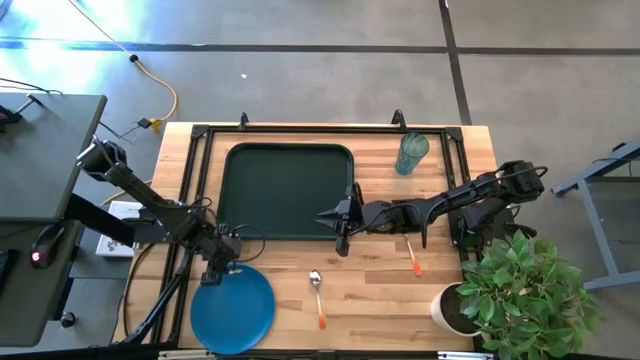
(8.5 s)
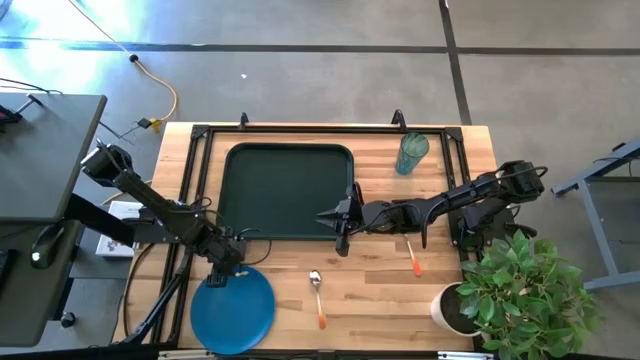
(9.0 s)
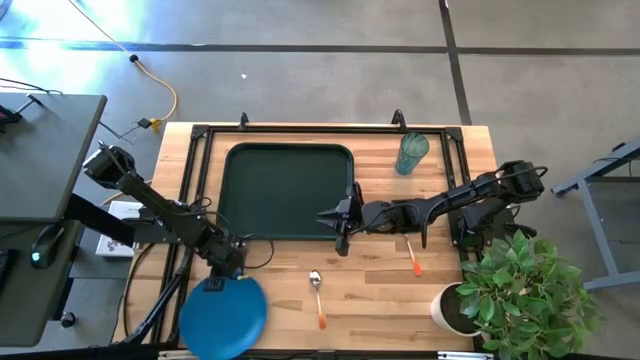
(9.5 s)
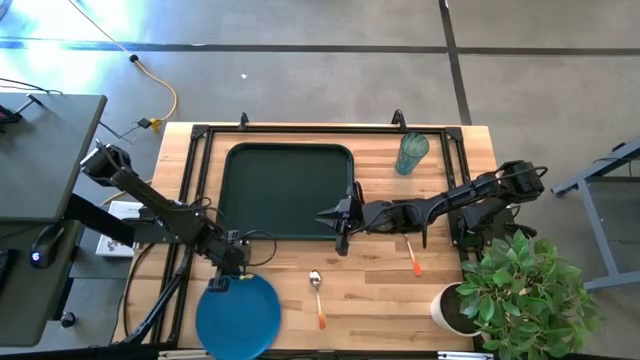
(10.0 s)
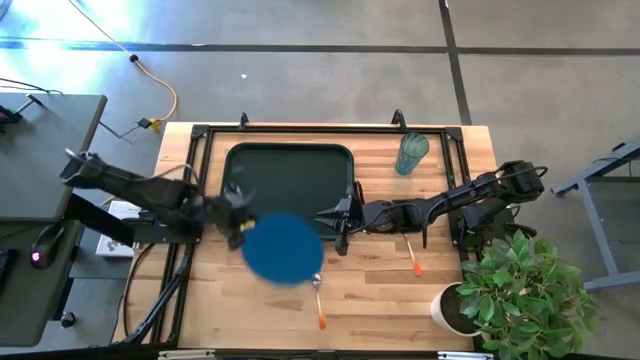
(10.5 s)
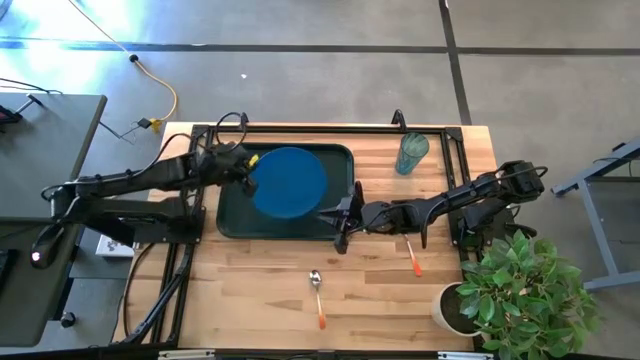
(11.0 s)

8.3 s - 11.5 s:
Task: Pick and place plate/cup/fork/spoon on tray
Put the blue plate on the black tray

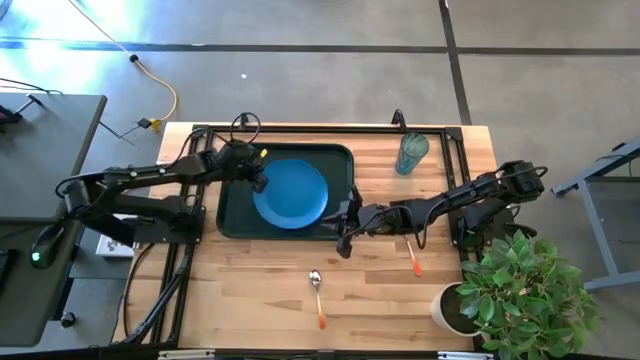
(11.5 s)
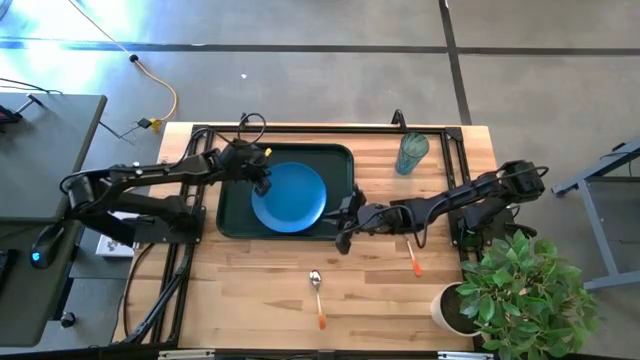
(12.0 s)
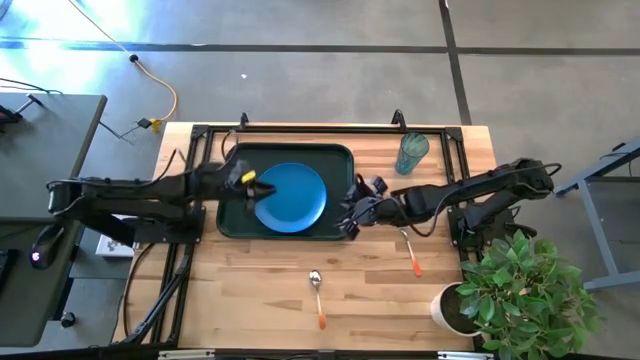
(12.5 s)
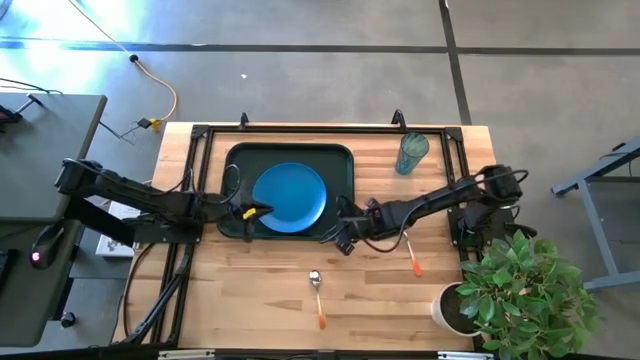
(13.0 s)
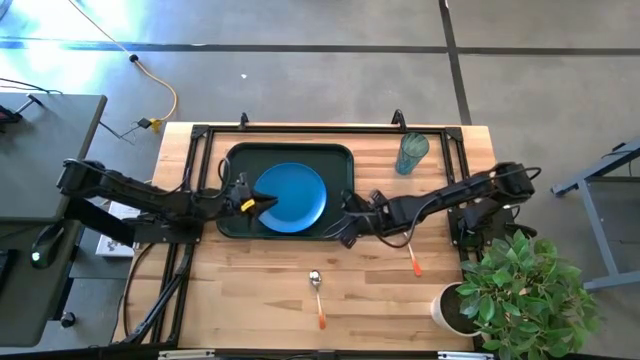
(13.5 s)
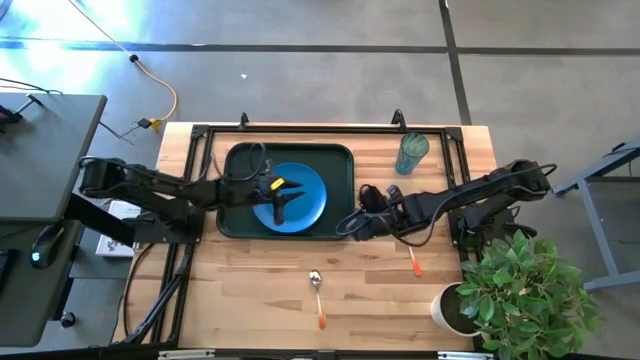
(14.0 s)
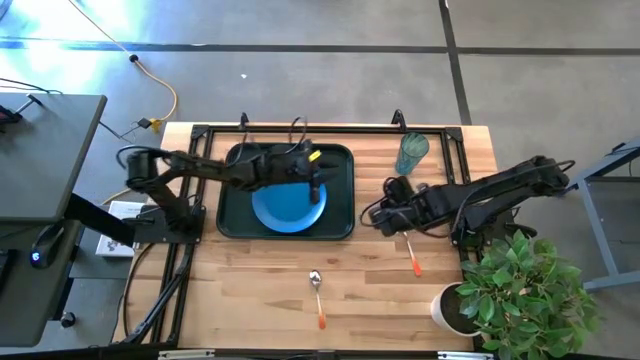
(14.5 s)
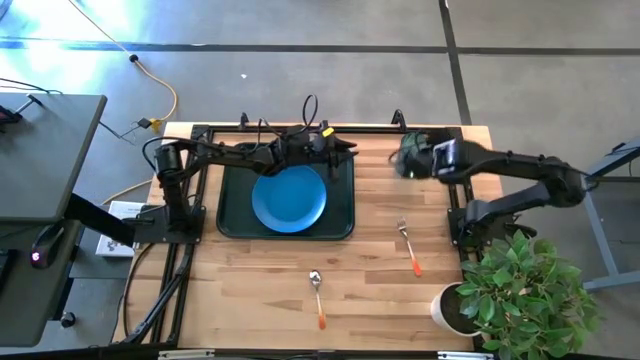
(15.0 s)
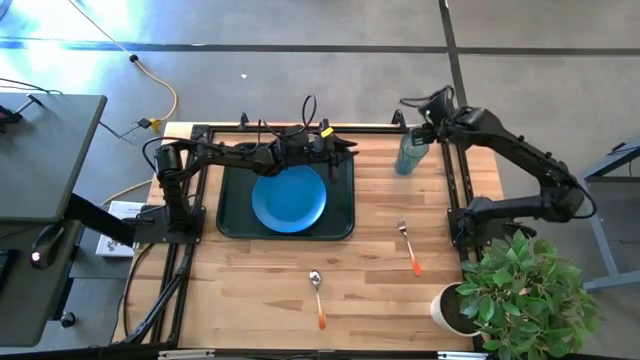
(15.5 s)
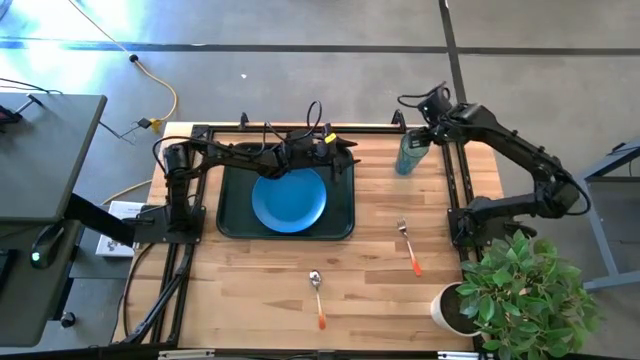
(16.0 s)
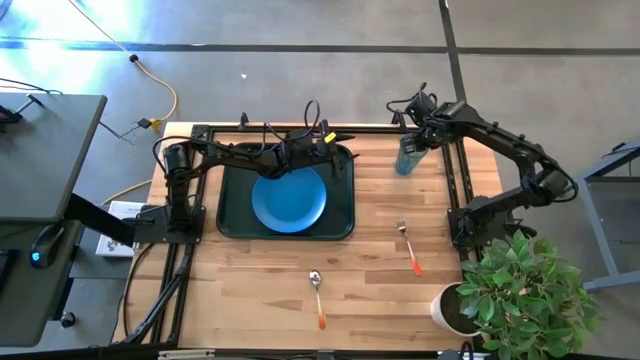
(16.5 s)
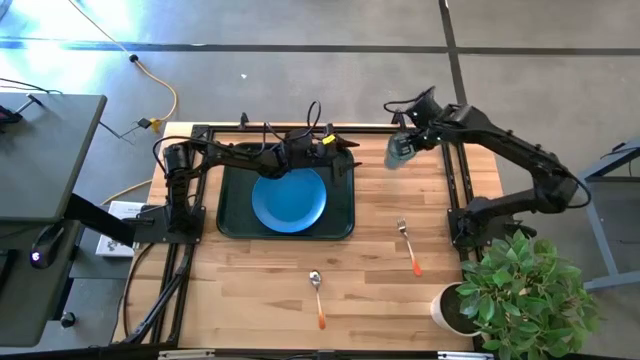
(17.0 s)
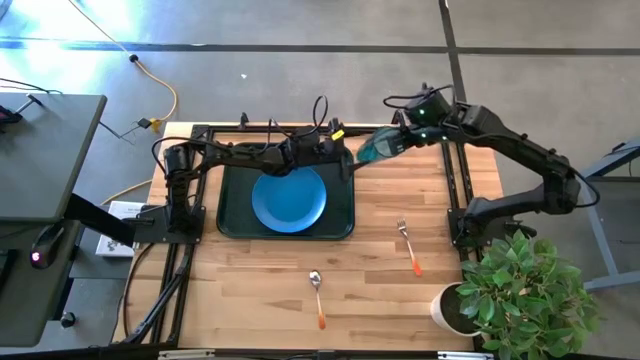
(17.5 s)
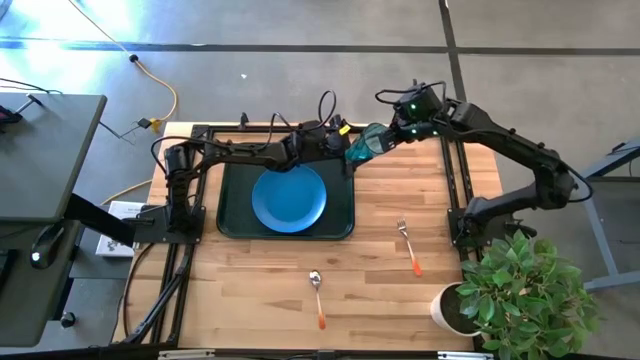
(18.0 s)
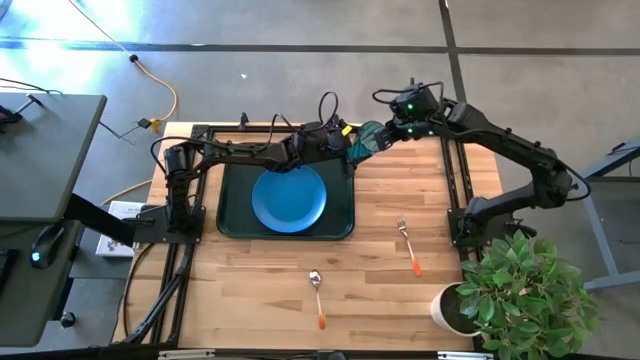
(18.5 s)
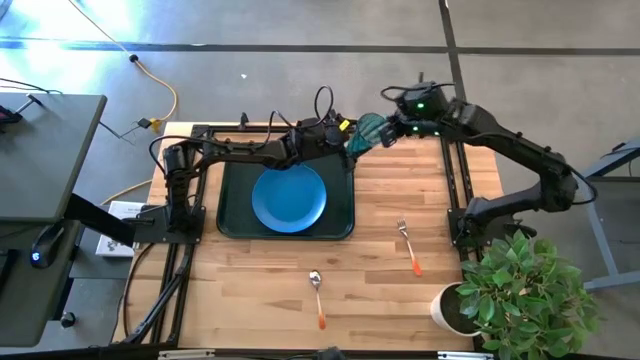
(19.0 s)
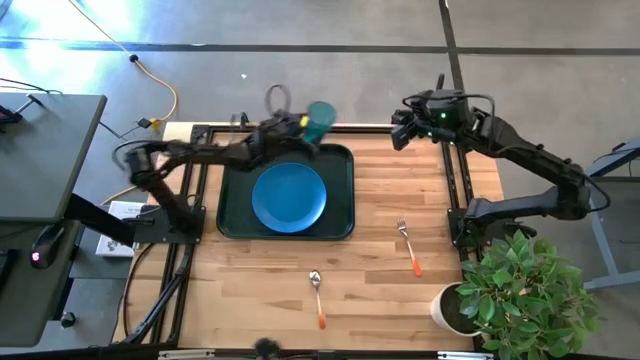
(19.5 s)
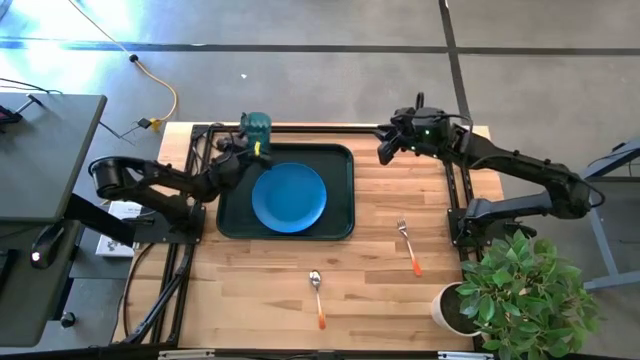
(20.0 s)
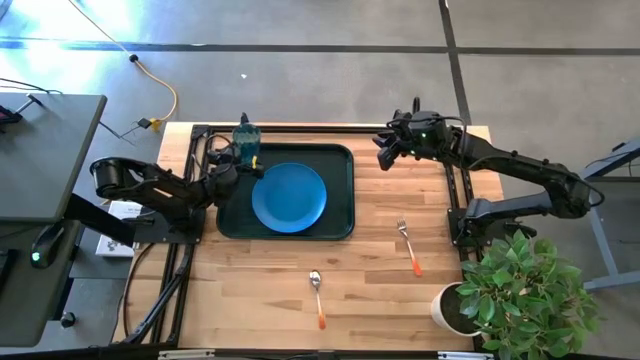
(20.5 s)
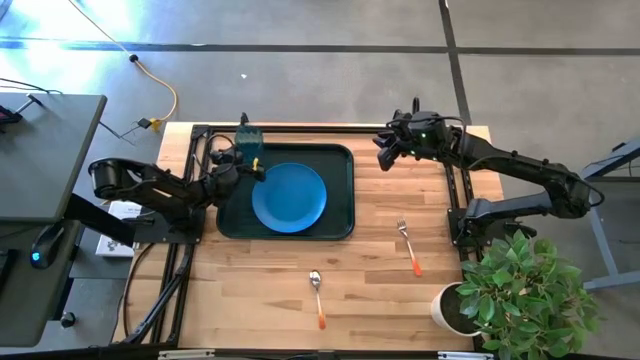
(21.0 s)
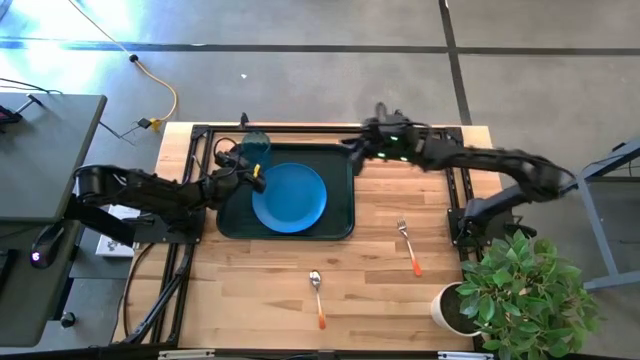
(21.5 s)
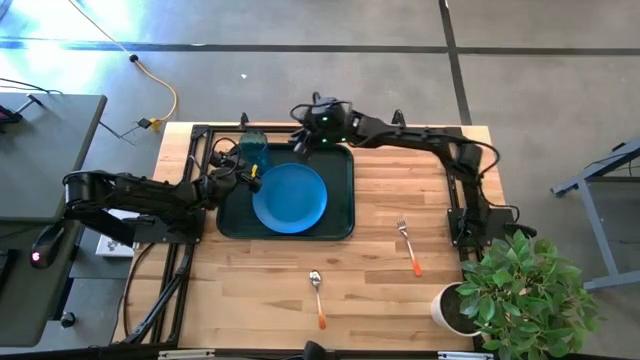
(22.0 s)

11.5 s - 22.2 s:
Put the blue cup on the black tray to the top left of the blue plate

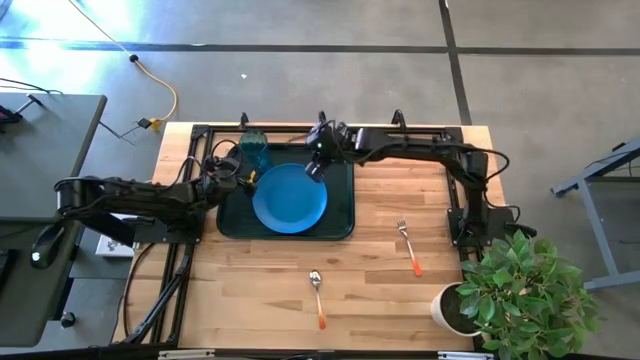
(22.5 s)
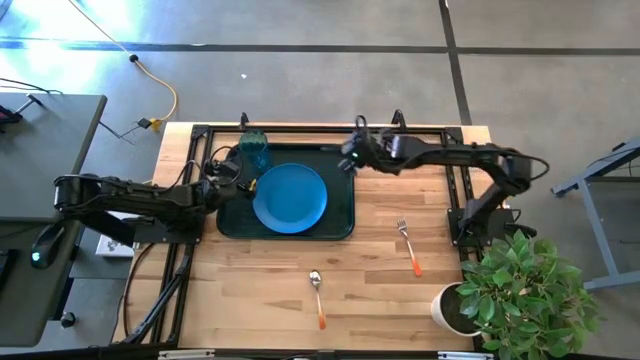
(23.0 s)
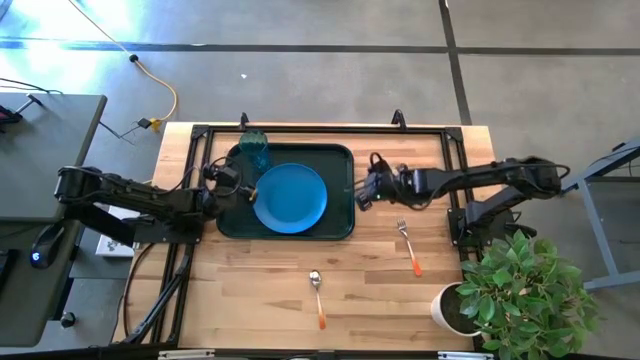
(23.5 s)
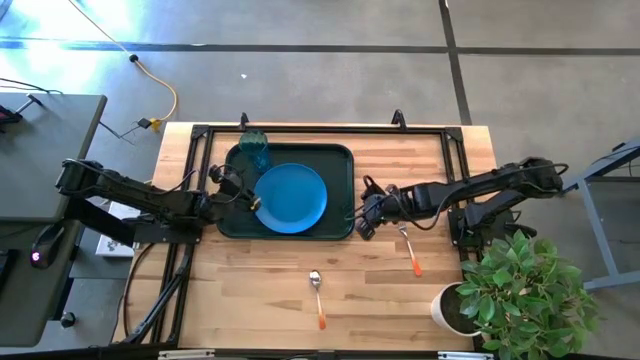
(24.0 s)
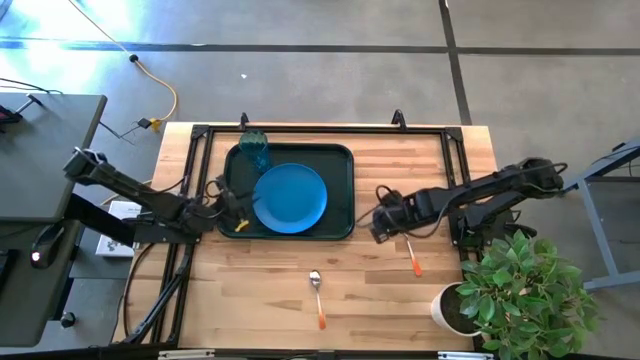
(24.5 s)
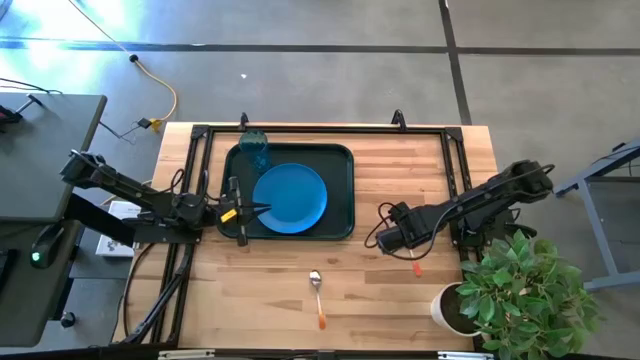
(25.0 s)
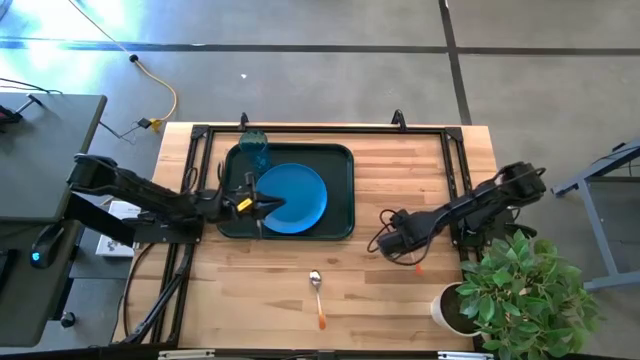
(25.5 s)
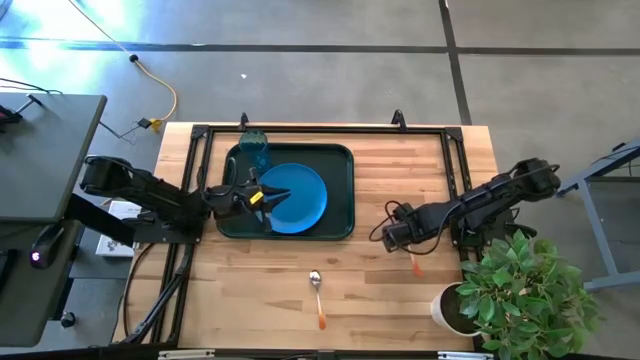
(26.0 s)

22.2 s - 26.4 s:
Put the orange fork on the black tray to the right of the blue plate

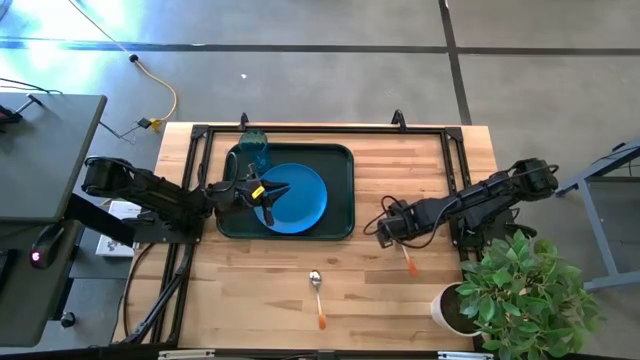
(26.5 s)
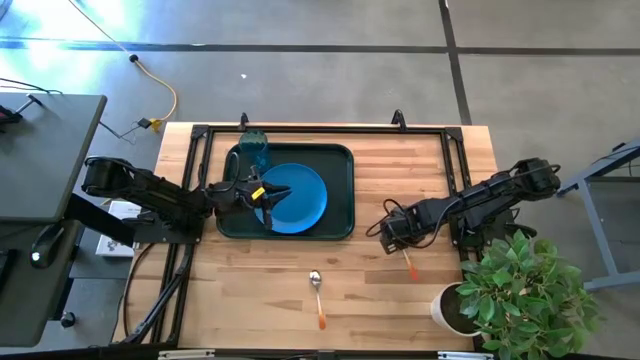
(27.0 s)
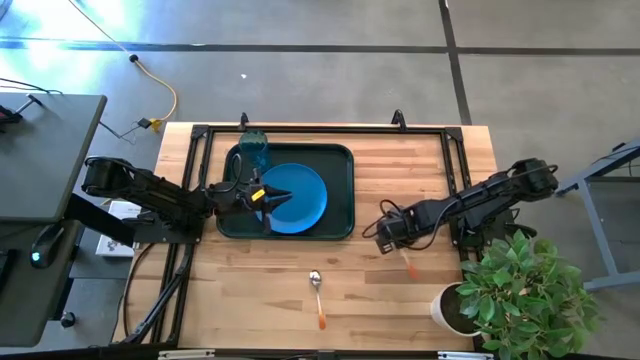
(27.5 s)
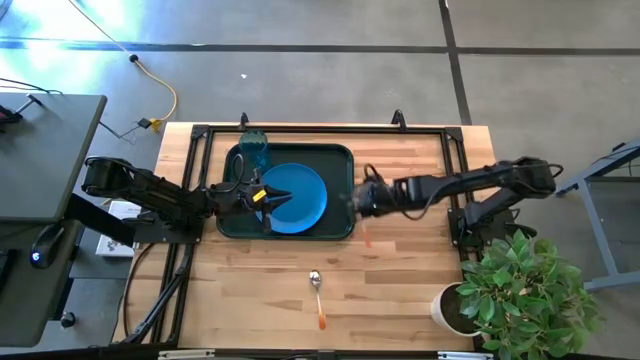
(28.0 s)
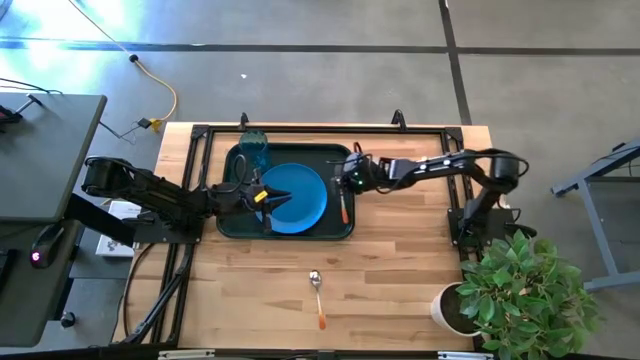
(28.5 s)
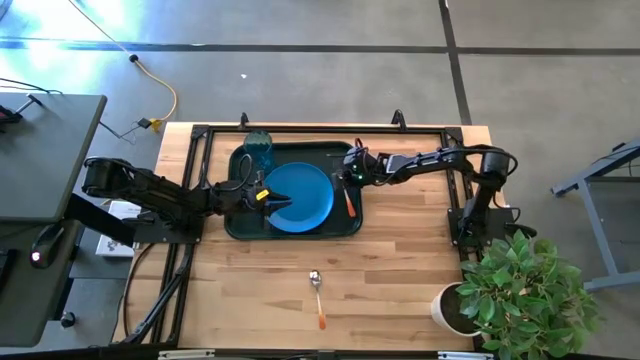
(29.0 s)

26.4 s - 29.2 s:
Put the orange fork on the black tray to the right of the blue plate

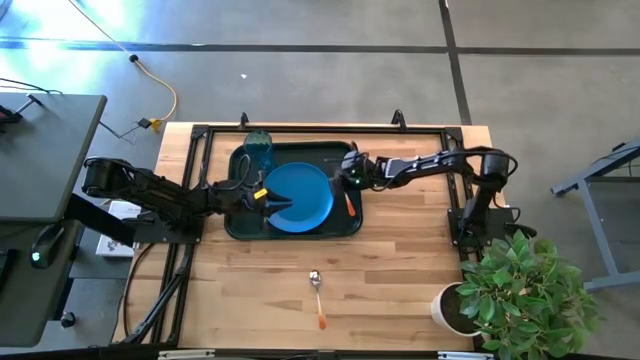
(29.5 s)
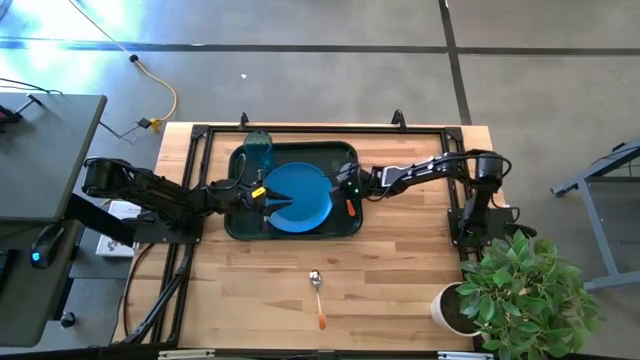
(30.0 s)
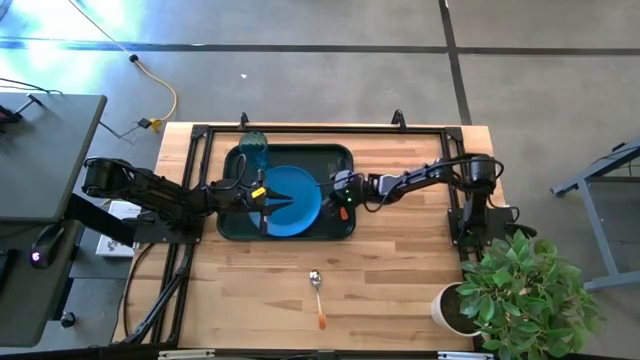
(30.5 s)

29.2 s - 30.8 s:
Adjust the blue plate
